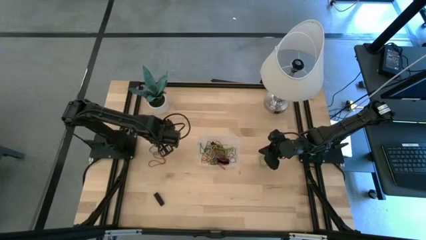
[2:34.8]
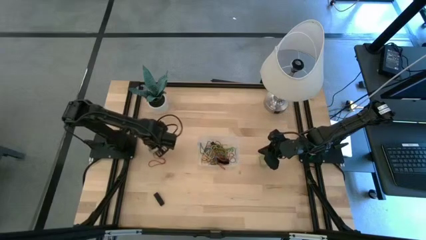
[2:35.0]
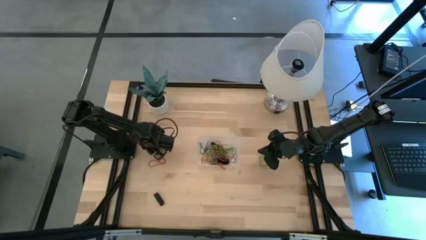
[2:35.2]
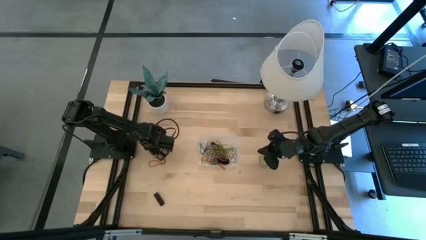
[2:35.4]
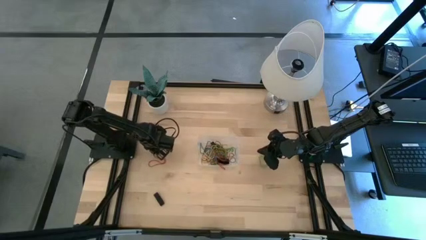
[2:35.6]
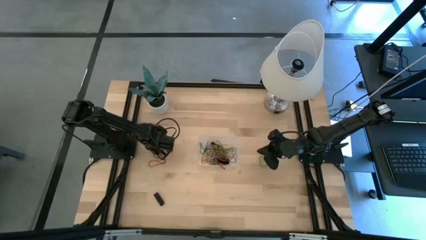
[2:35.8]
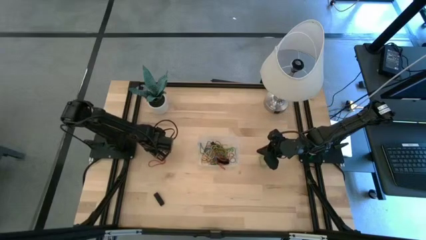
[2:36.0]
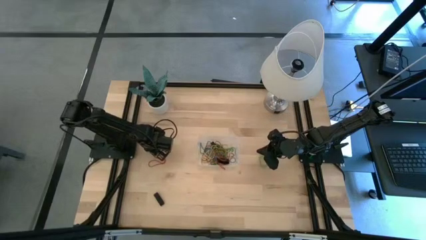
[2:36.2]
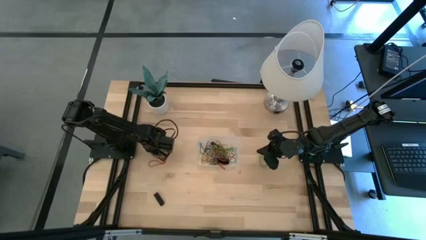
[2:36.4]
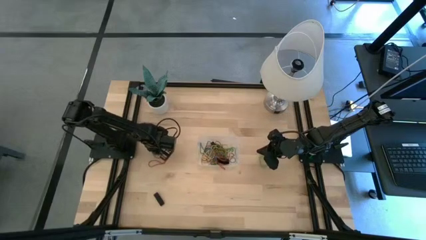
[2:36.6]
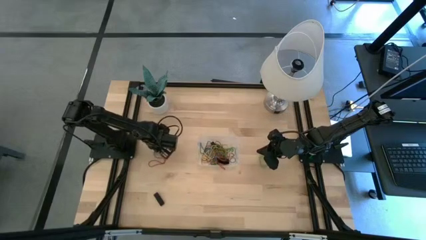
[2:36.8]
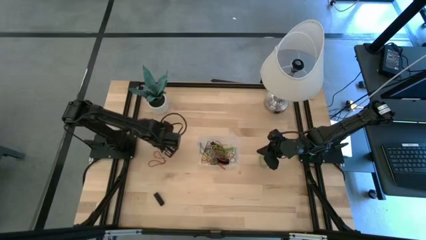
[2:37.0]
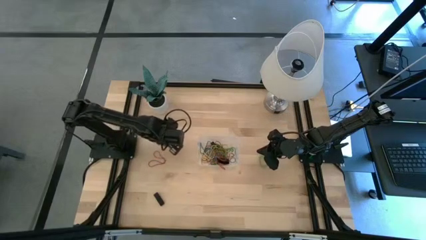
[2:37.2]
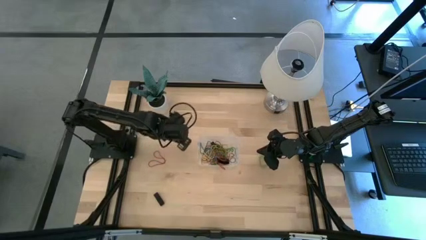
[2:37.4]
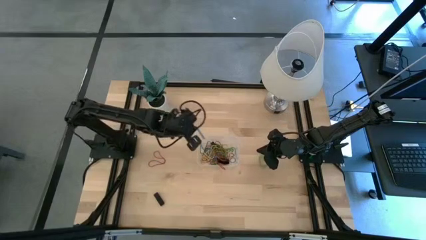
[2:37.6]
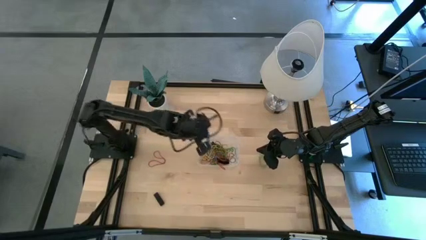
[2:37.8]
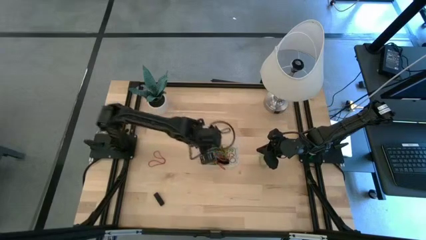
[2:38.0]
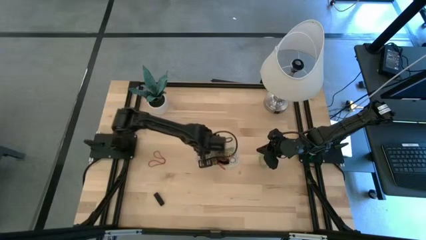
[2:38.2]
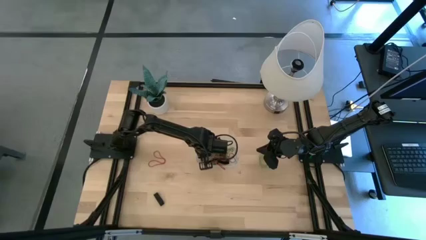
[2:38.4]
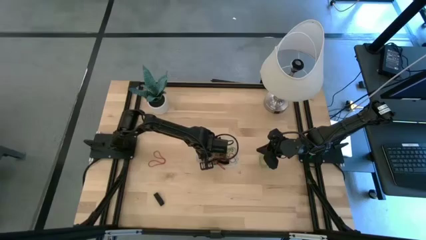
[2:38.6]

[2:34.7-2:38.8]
Task: Pick and place rubber bands into bin
Put the blue rubber band into the transparent bin

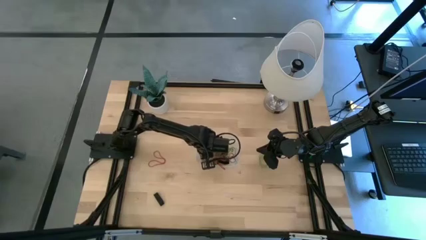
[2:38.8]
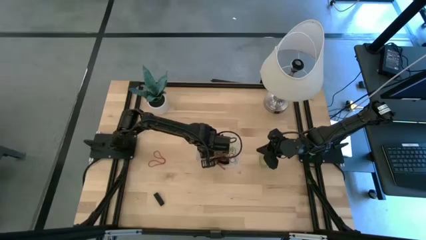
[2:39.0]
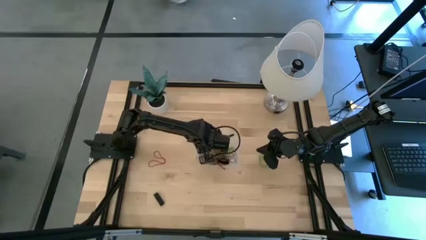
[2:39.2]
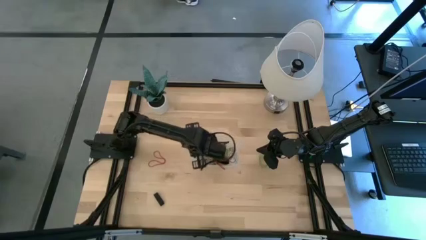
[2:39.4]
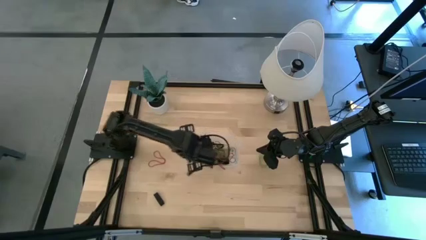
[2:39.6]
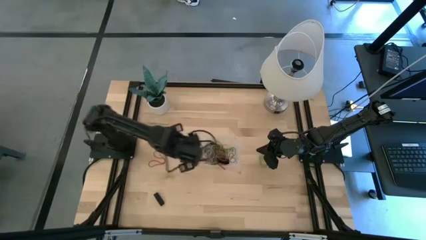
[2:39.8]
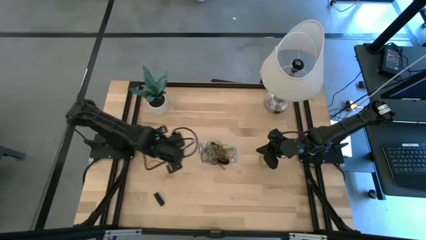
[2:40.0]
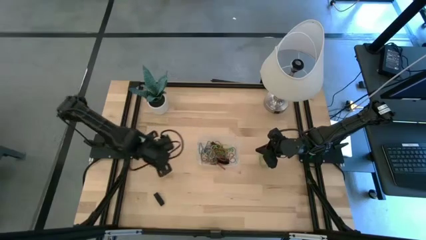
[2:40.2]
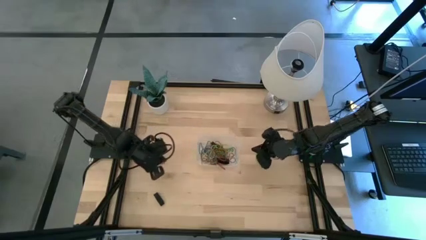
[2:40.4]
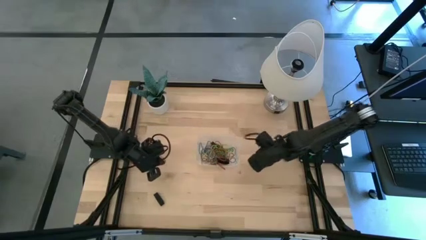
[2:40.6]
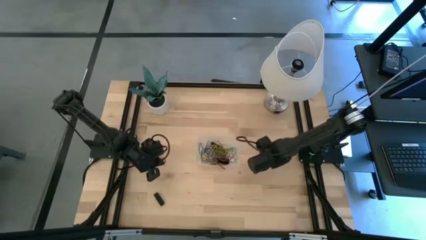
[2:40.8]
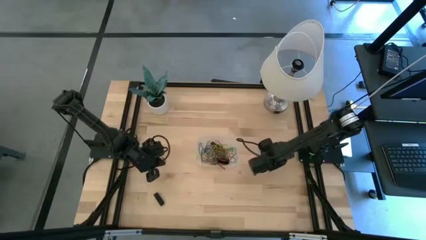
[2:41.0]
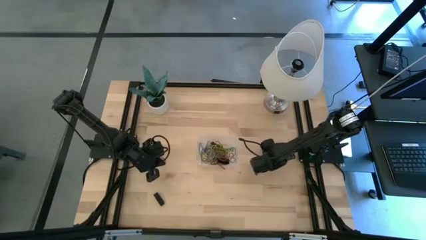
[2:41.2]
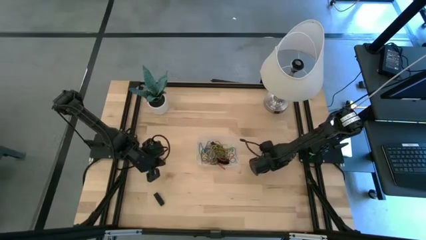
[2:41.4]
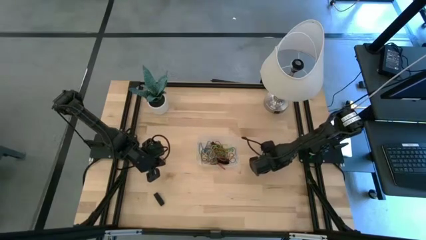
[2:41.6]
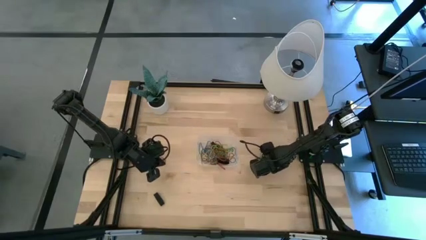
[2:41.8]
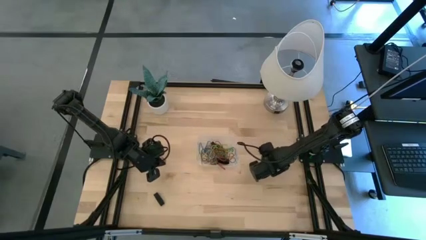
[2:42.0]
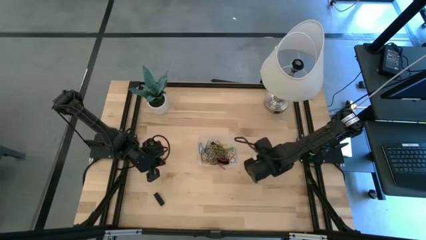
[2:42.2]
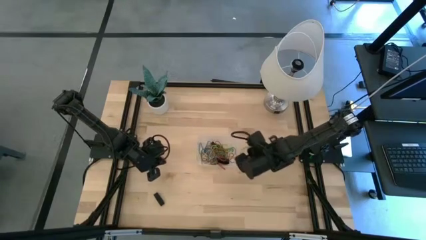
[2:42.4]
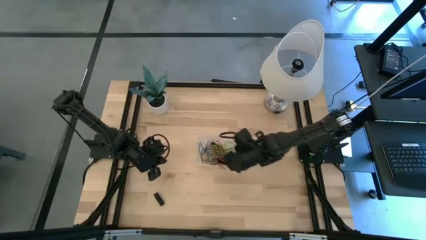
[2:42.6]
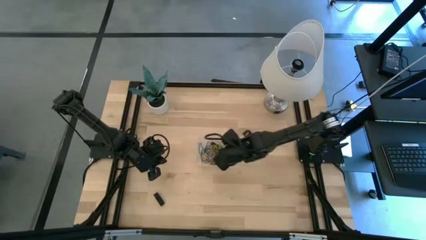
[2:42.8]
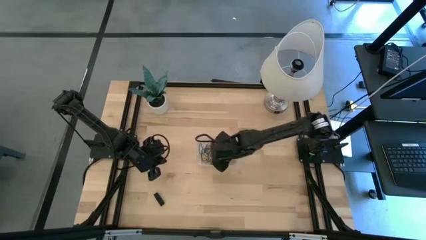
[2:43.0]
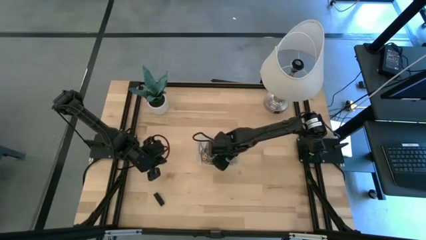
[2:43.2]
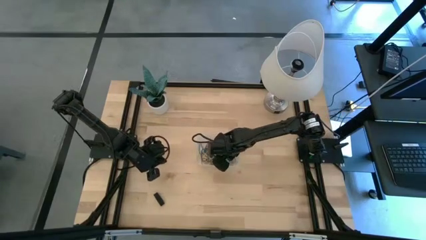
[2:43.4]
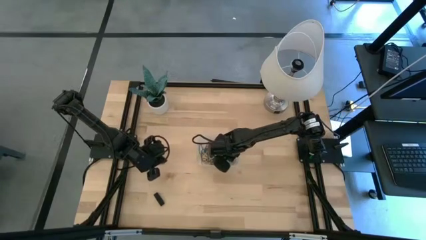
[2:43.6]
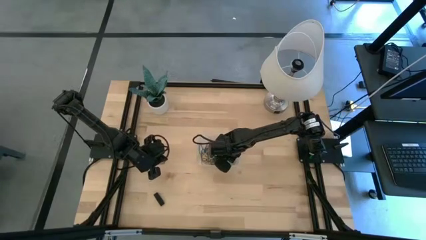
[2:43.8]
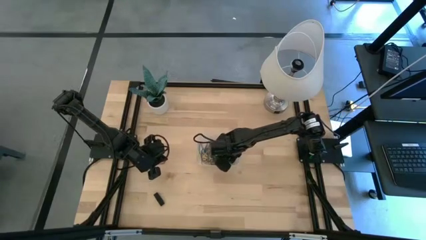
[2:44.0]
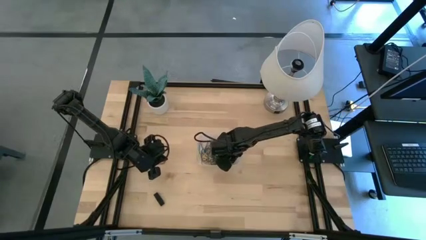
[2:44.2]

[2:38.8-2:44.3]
Put the green rubber band into the transparent bin

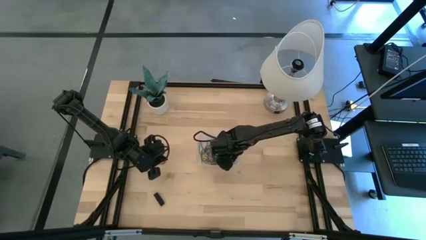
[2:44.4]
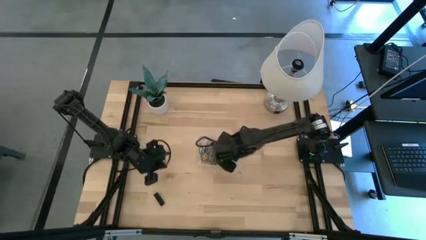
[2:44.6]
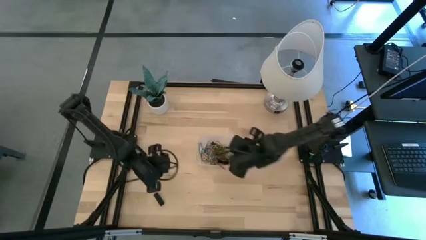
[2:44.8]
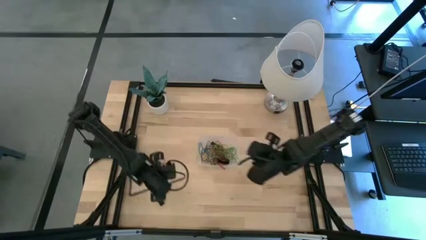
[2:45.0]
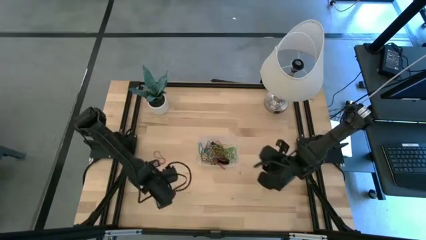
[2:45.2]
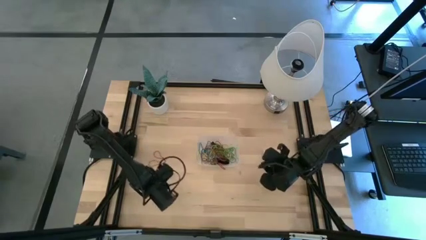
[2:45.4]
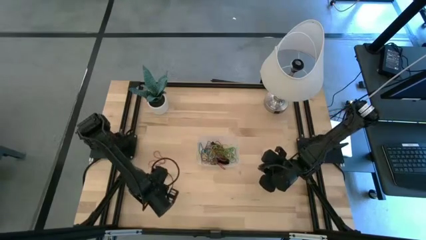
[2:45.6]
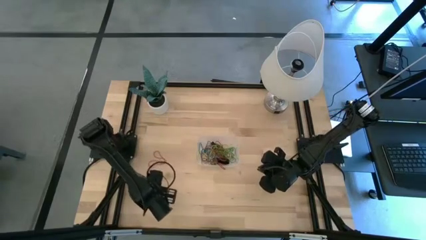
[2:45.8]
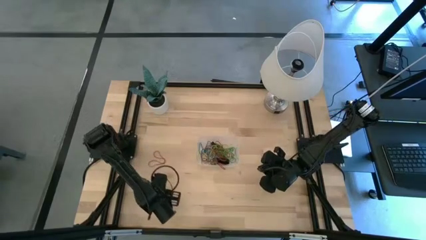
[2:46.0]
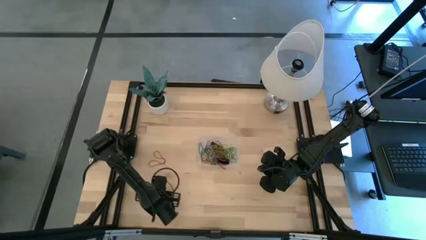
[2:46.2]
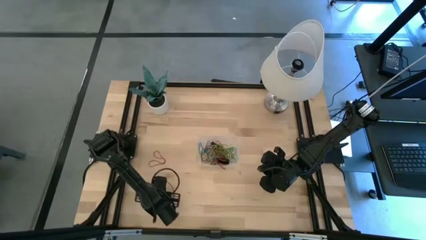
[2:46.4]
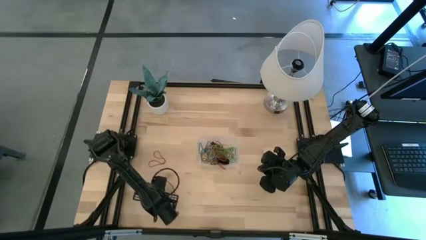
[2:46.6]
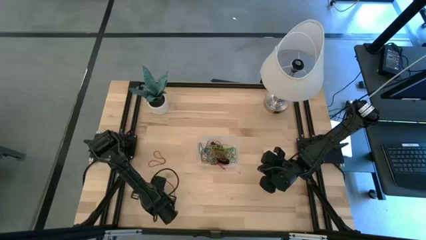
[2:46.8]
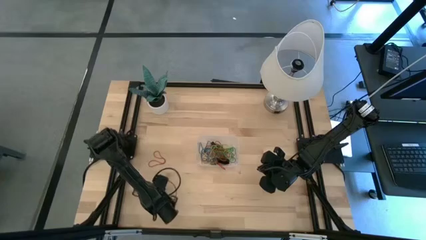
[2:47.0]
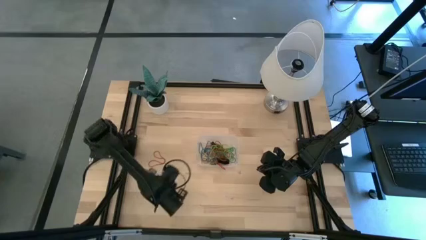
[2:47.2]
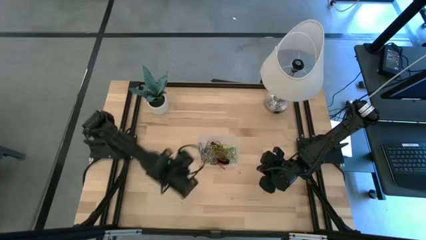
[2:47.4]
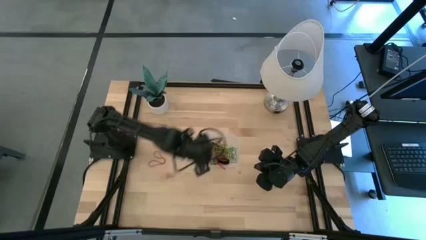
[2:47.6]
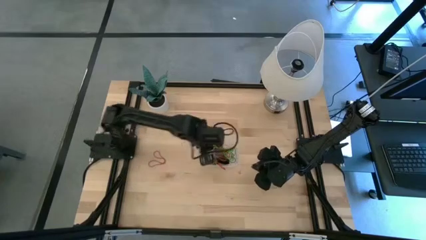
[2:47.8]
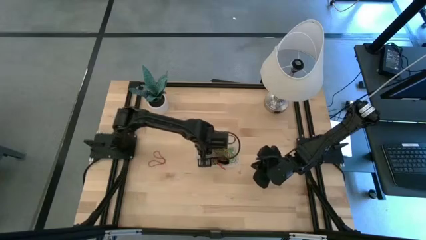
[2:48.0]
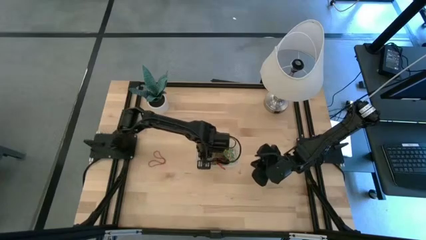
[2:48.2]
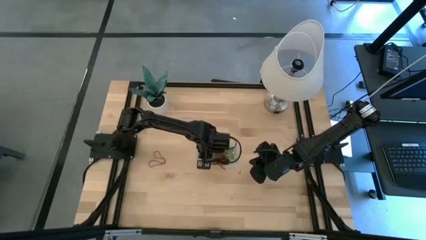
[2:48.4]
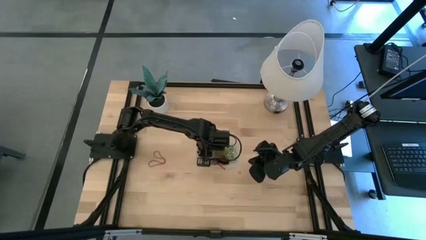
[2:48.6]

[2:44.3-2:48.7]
Put the black rubber band into the transparent bin

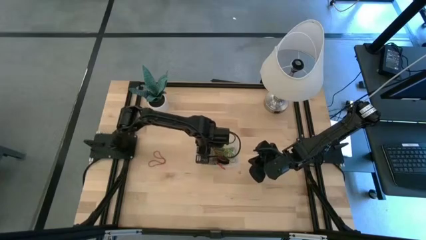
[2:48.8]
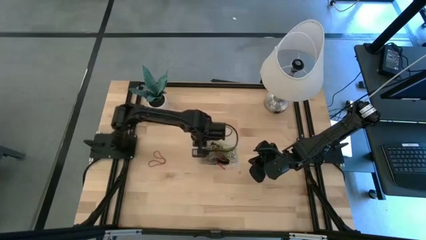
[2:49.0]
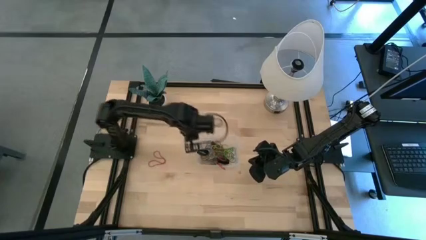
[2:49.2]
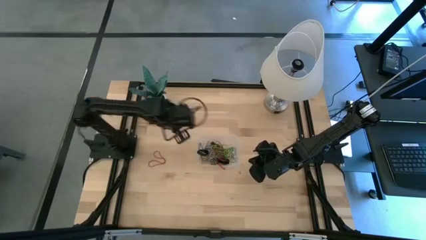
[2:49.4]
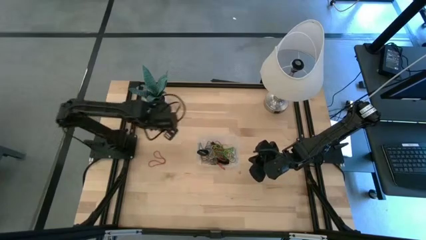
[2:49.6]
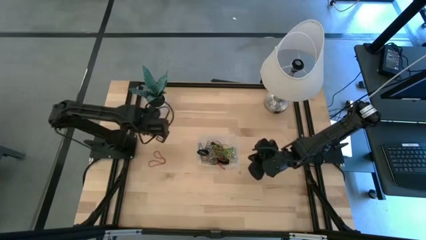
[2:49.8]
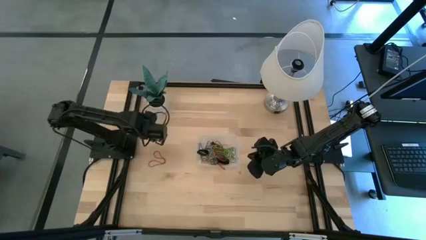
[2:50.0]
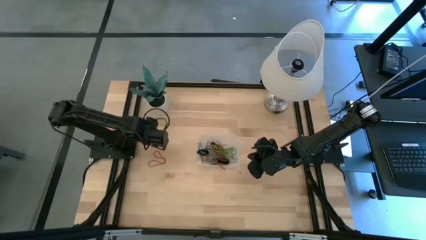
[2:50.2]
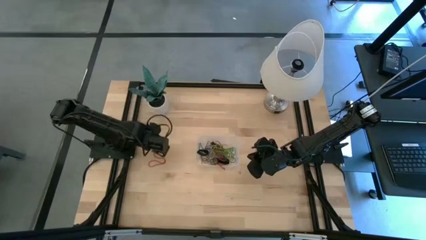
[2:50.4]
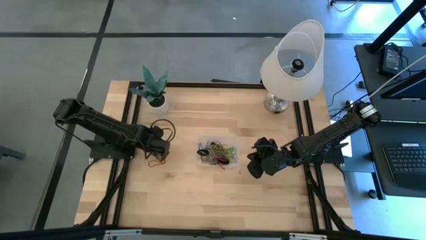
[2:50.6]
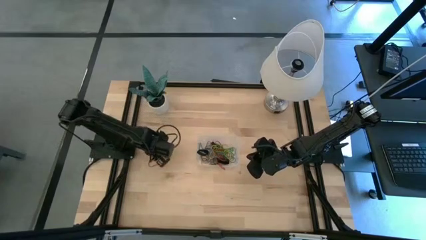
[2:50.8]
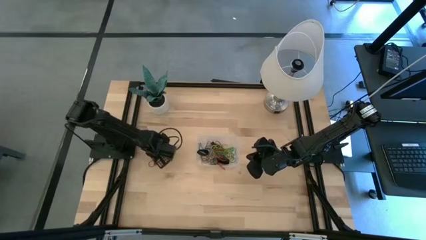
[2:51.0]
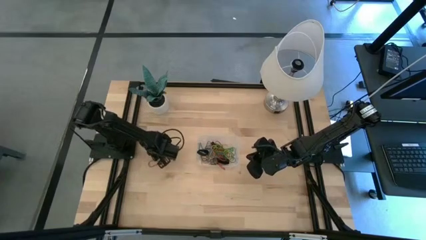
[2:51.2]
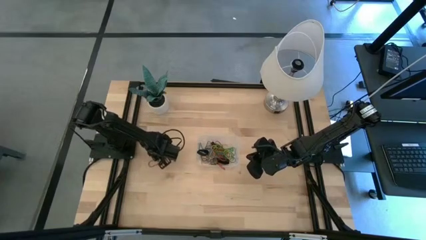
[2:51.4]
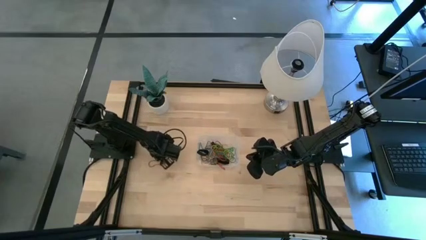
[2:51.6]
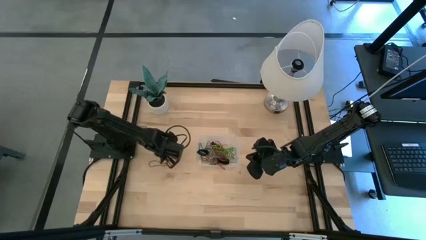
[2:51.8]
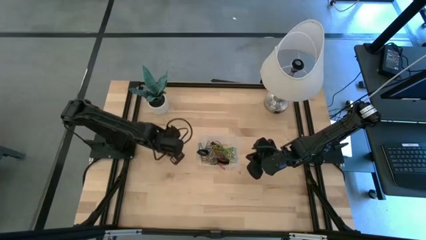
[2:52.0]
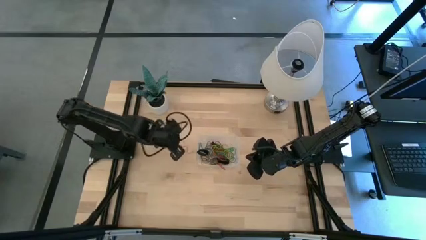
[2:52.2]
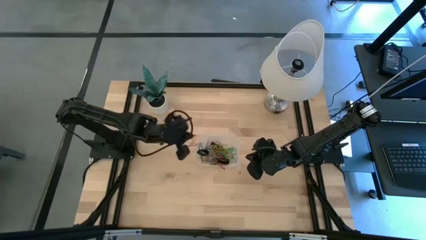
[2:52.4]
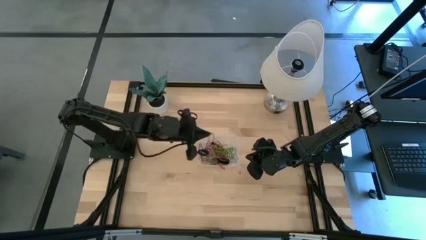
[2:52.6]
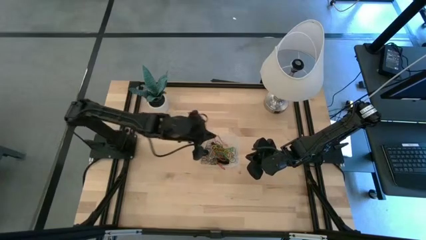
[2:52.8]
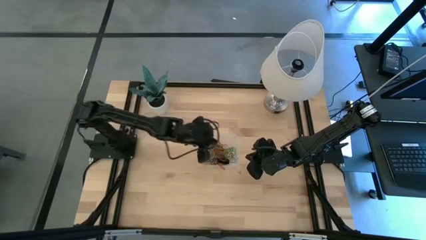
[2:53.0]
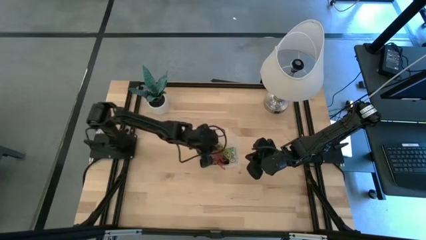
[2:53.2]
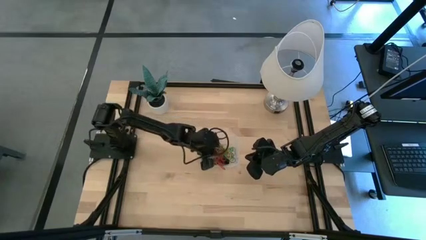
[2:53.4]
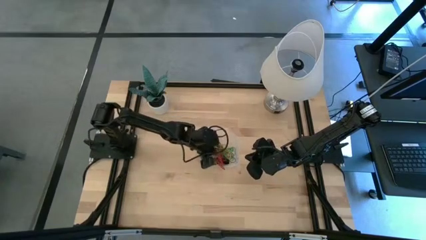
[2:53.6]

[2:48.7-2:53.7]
Put the red rubber band into the transparent bin
